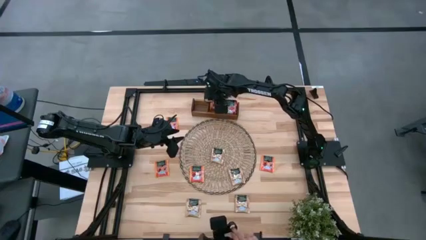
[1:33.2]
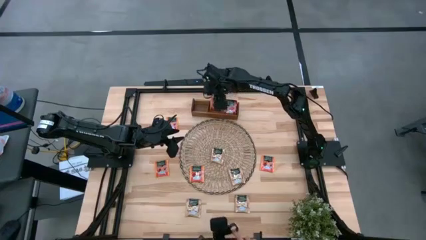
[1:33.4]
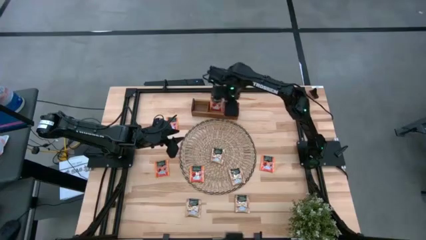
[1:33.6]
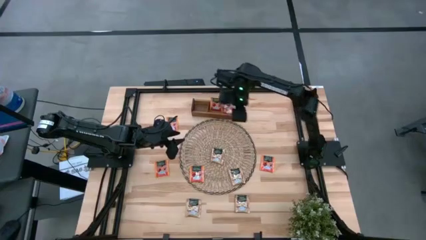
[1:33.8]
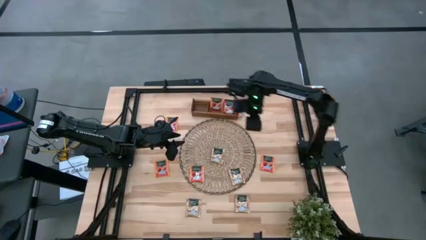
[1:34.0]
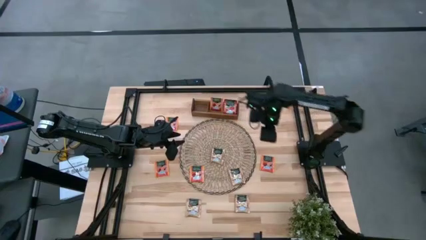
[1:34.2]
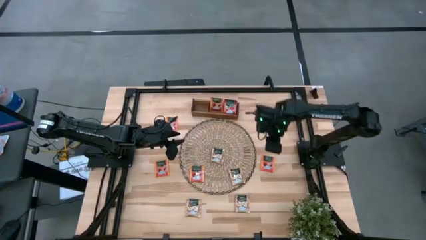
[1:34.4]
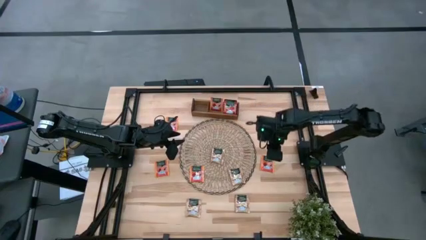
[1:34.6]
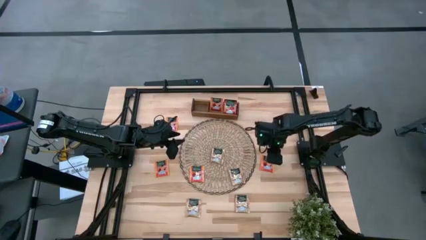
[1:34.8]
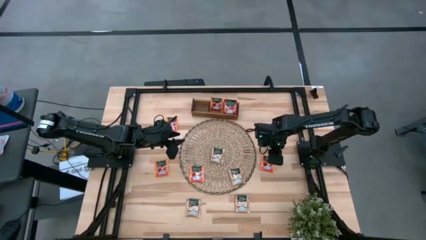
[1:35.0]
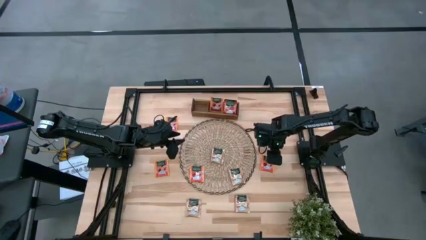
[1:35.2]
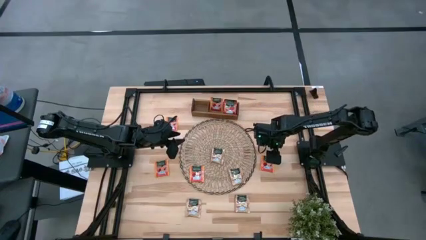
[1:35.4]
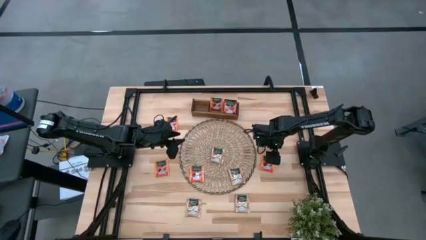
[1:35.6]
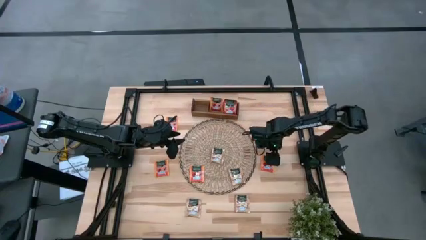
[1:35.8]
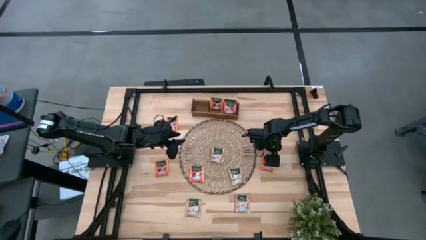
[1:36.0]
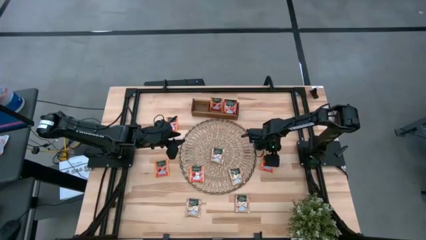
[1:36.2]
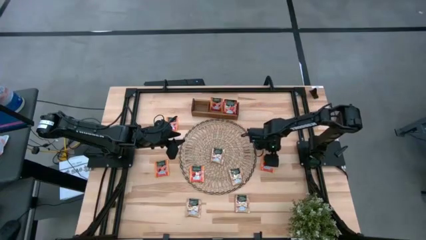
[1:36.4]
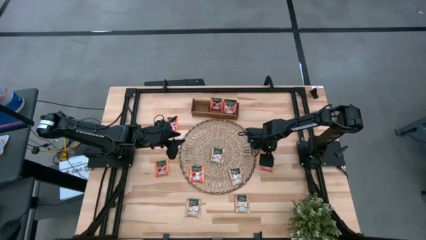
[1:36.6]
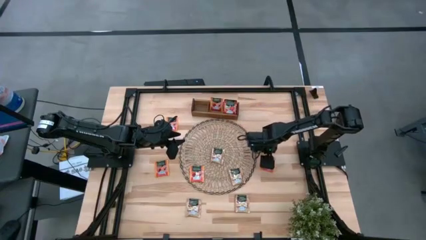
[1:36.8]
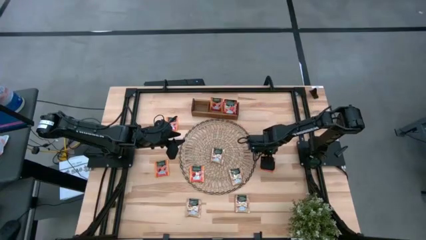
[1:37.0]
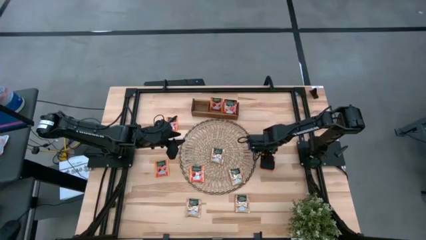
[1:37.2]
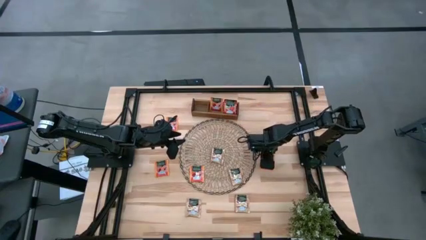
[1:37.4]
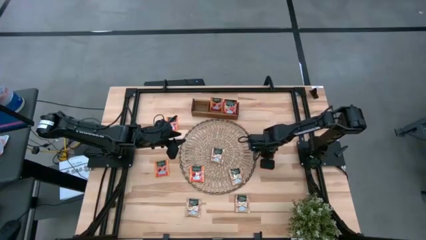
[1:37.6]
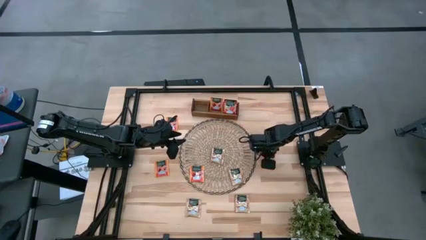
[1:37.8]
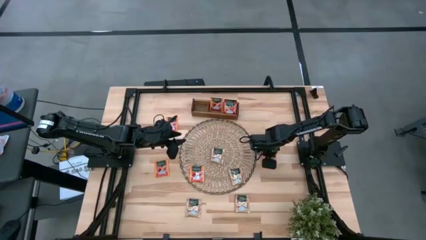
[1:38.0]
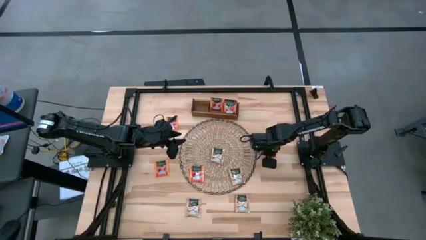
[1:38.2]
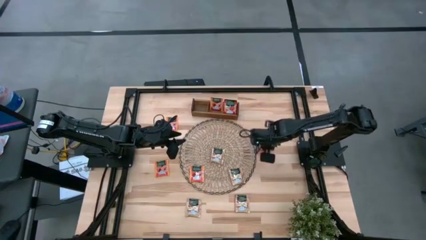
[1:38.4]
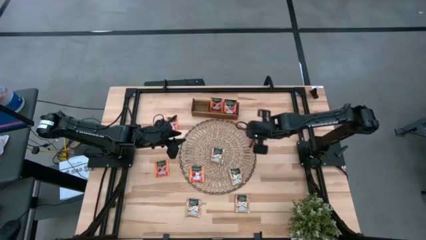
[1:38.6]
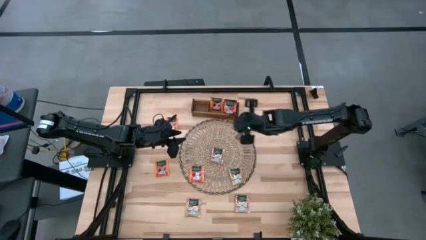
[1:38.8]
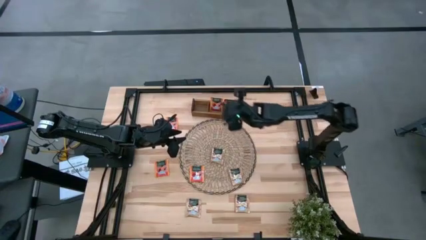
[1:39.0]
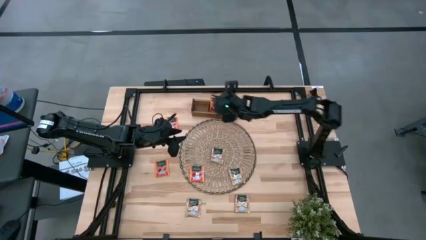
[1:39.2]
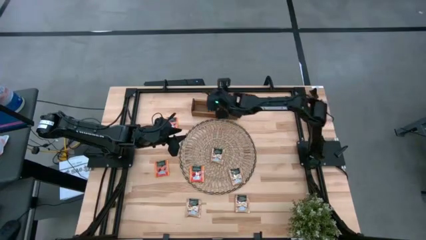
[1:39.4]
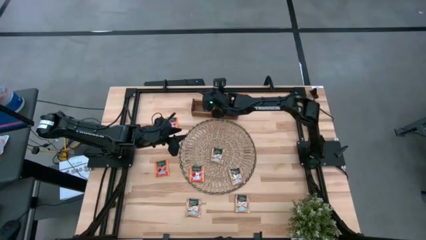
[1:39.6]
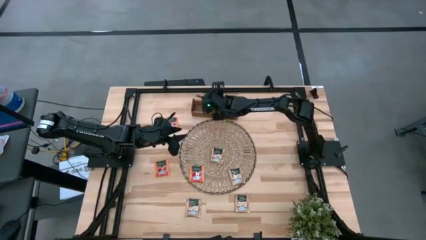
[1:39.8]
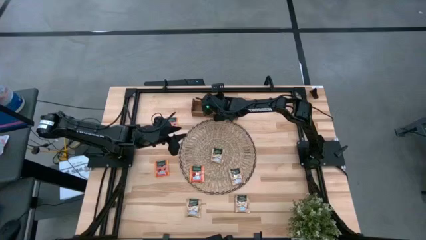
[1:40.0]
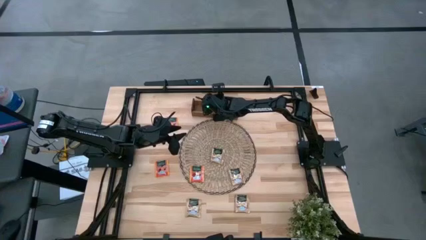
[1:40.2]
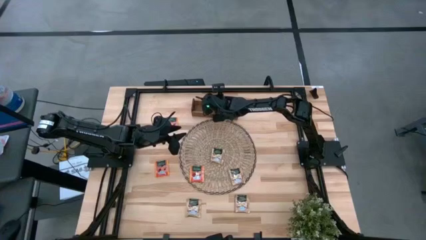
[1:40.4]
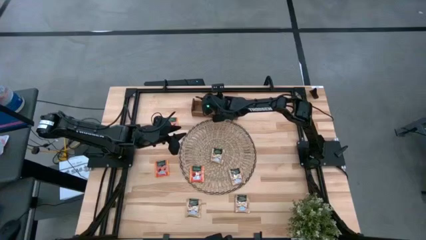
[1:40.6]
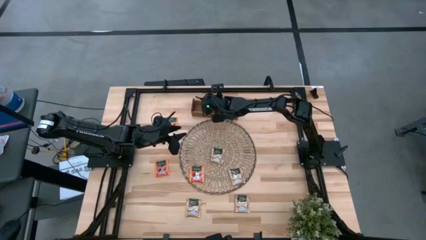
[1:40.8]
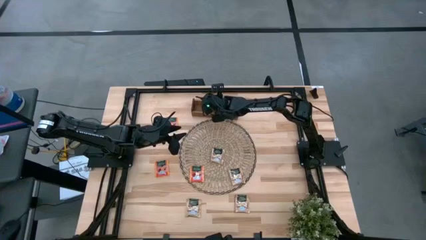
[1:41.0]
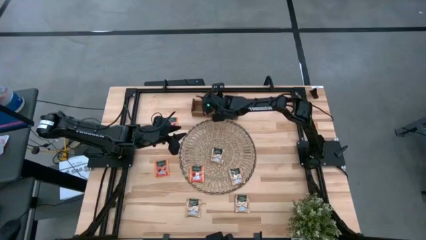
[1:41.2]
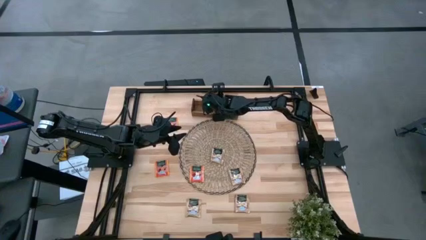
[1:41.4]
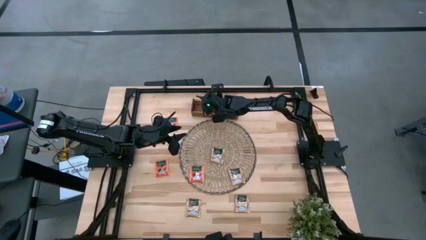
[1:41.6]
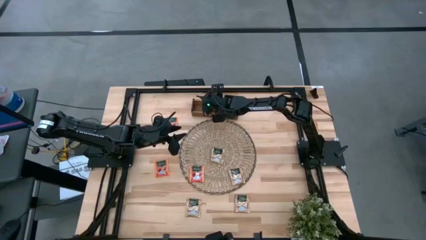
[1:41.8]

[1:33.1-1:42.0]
Task: Pick & Place Tea
Put the orange tea bag into the middle section of the wooden organizer

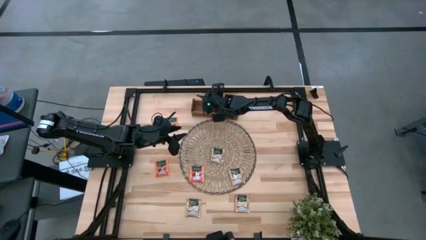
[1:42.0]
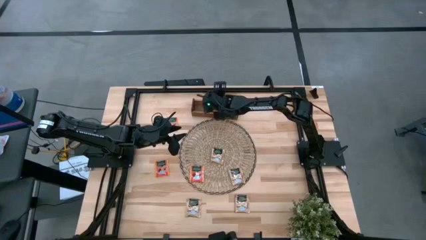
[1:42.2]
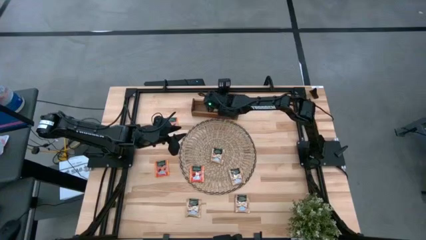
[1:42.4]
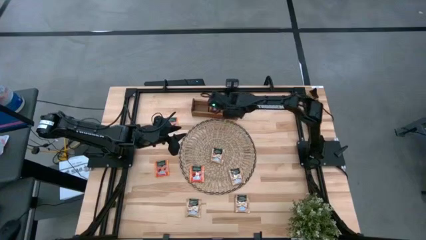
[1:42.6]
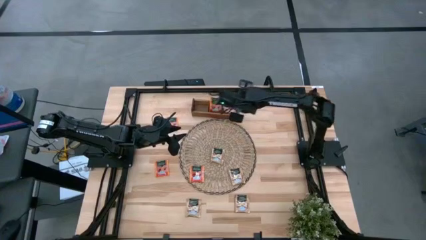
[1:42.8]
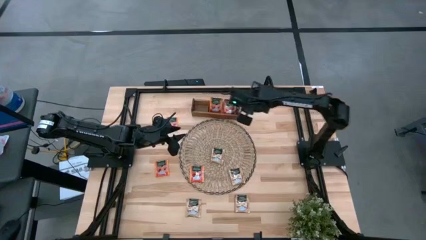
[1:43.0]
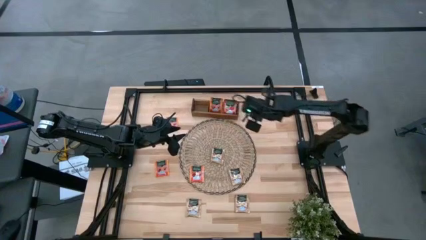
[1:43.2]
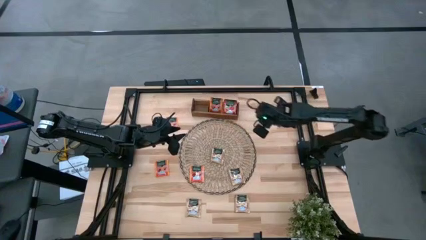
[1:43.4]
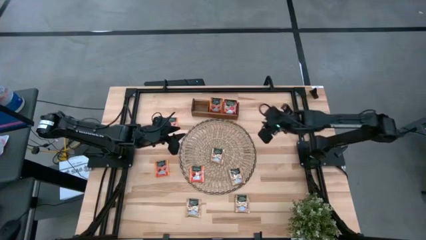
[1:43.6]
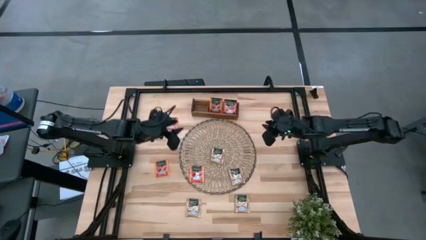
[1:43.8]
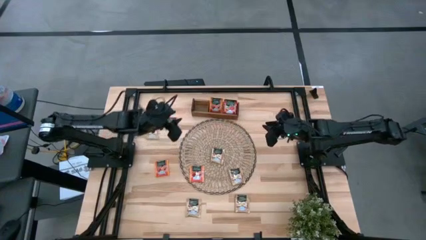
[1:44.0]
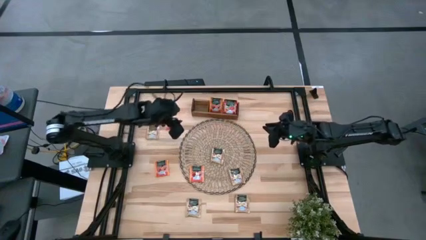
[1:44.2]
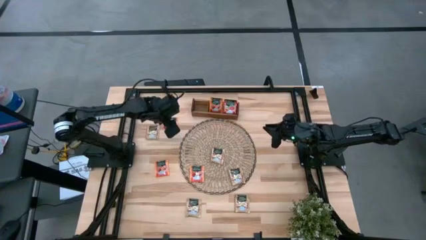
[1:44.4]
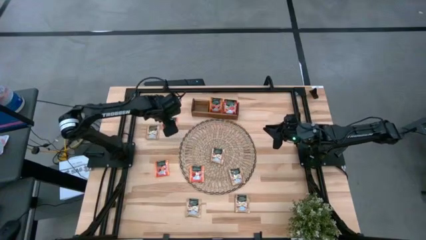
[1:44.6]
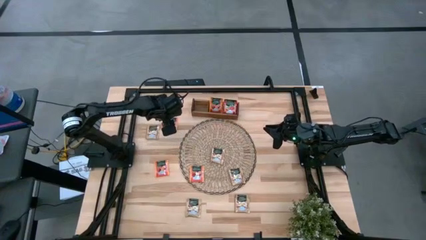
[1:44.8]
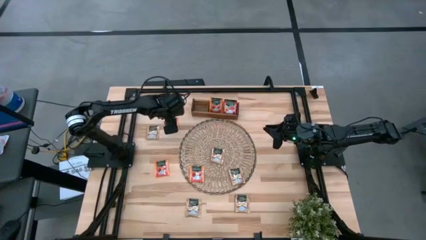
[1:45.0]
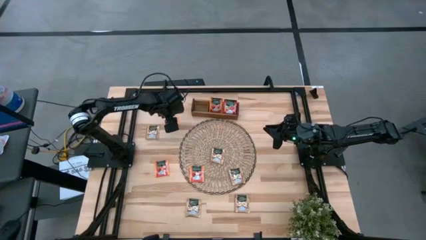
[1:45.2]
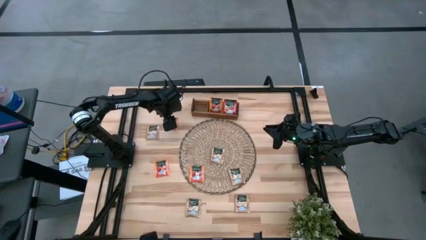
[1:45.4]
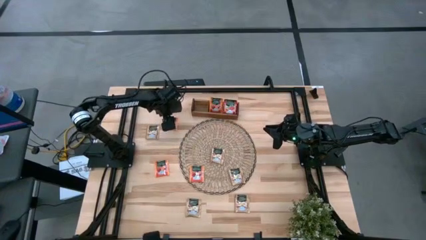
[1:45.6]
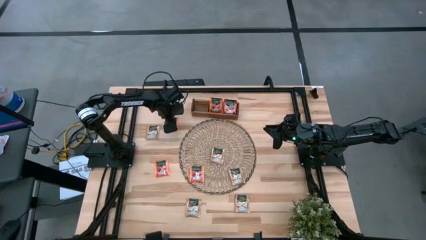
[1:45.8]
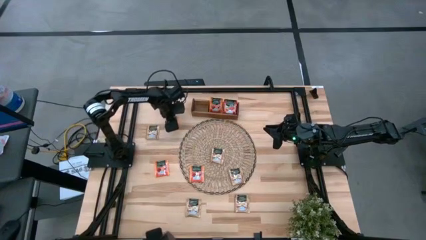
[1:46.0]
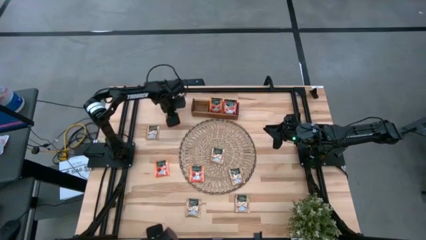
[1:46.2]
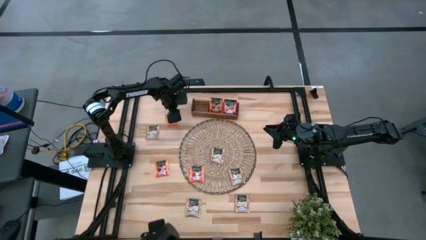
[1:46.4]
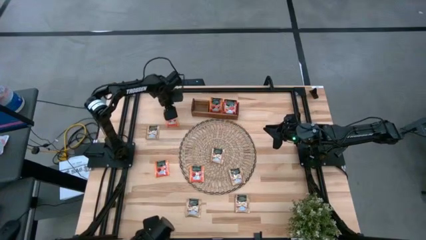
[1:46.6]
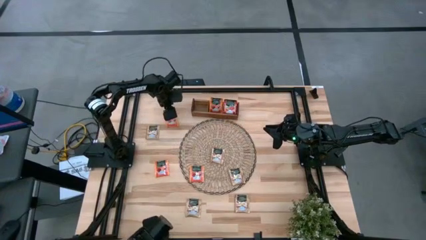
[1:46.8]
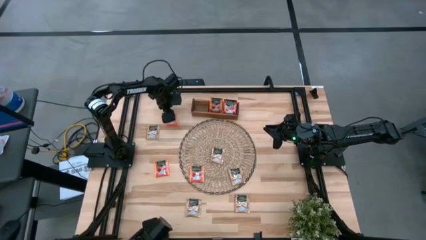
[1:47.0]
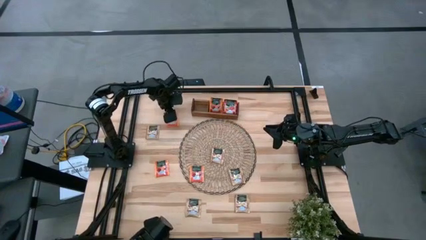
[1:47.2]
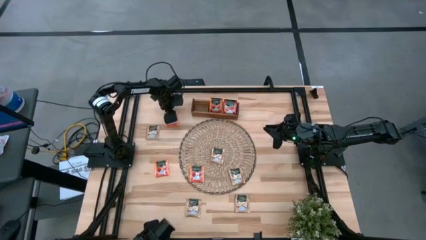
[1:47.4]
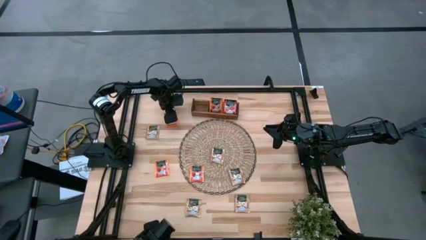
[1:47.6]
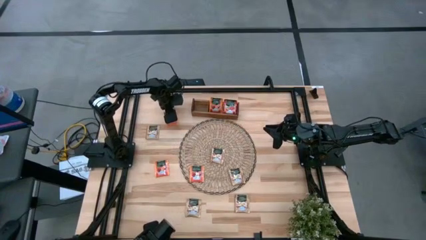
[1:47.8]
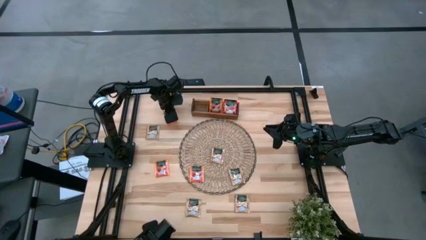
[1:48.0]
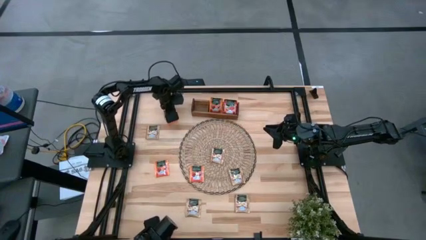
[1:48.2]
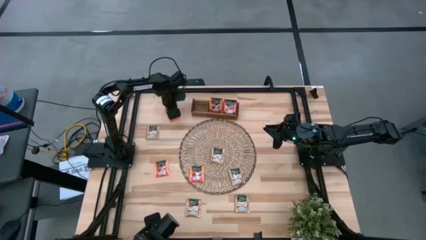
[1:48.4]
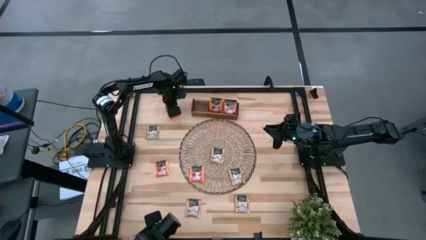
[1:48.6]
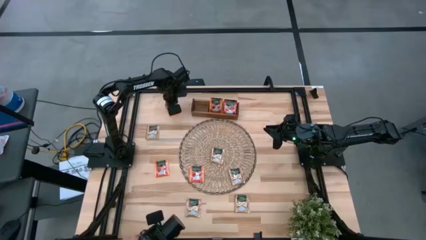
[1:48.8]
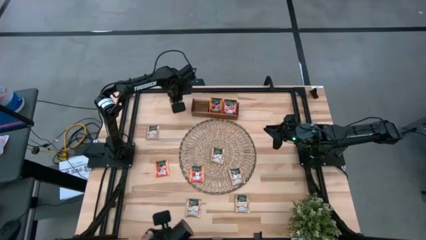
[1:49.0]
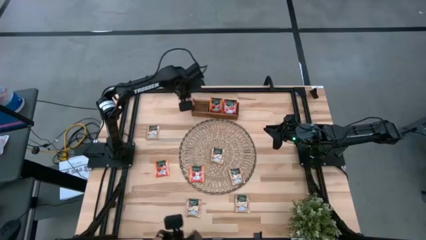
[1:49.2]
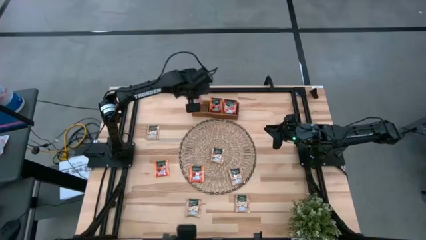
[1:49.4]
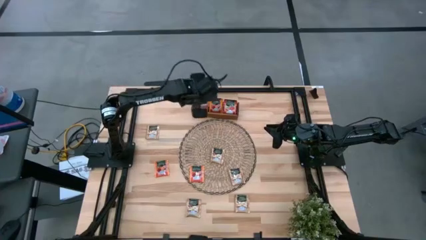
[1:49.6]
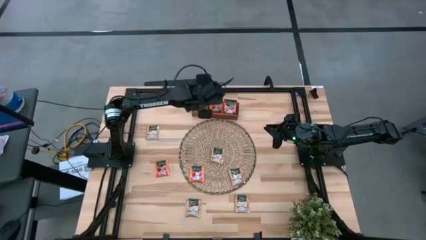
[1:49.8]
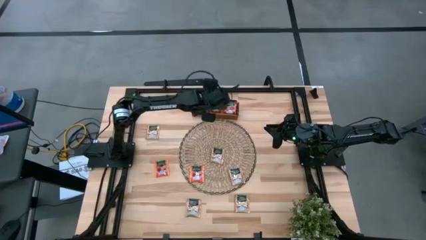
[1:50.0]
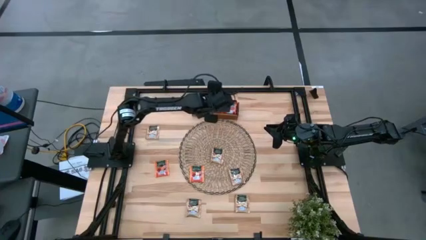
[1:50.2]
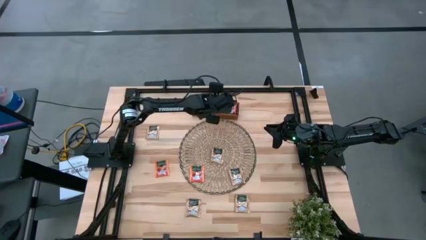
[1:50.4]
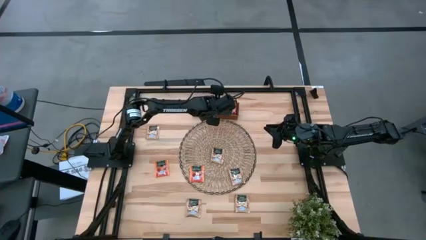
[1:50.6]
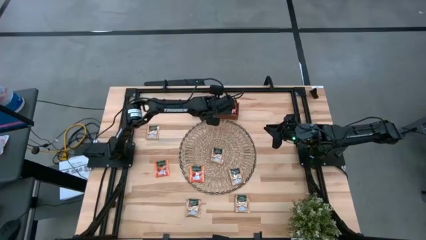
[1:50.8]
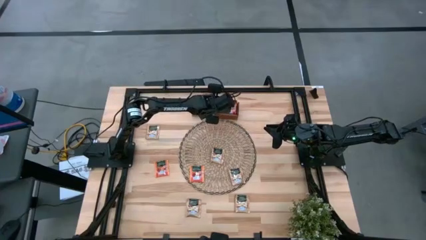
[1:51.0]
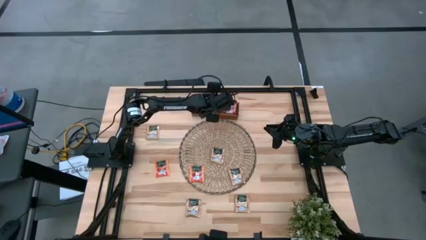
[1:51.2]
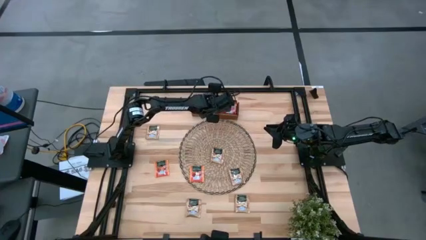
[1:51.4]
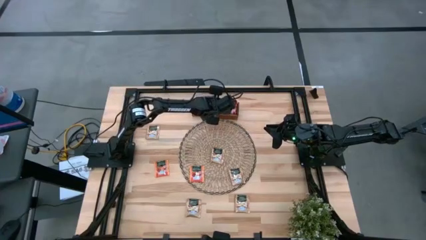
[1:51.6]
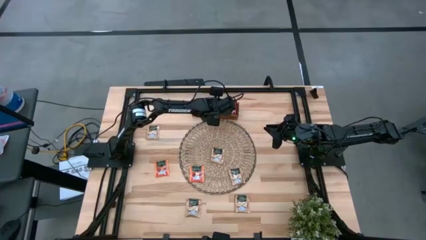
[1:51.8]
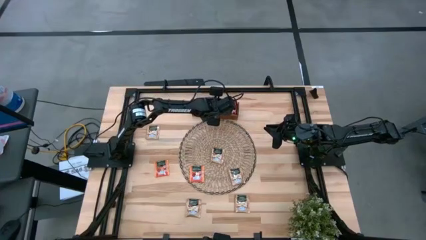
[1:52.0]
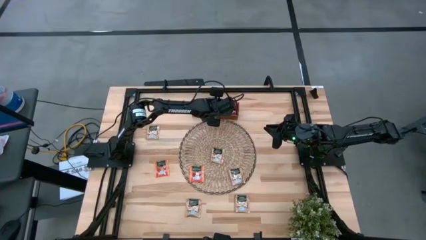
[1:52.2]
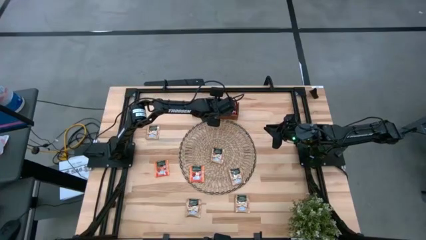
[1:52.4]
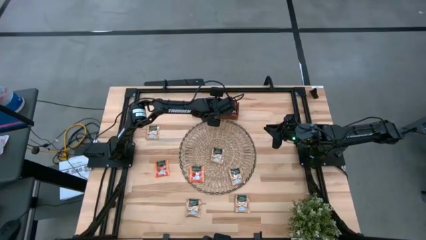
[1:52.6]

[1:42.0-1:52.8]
Put the orange tea bag into the middle section of the wooden organizer
